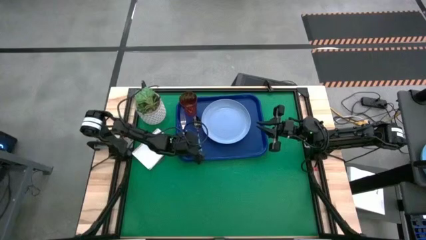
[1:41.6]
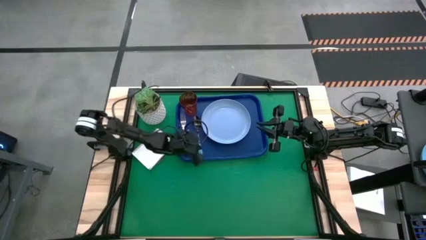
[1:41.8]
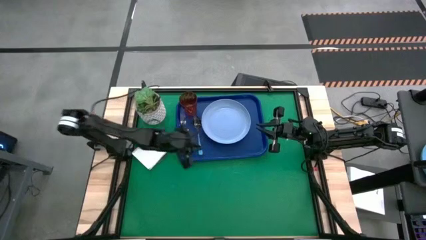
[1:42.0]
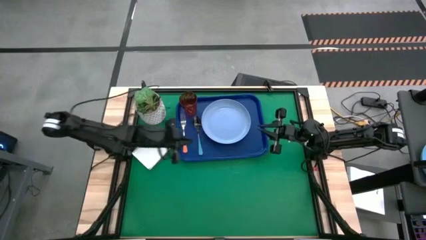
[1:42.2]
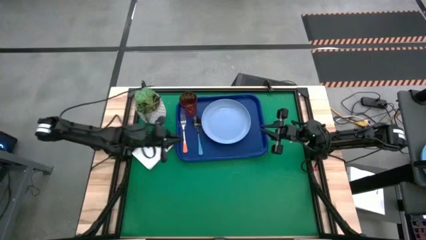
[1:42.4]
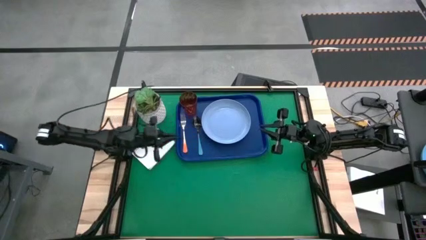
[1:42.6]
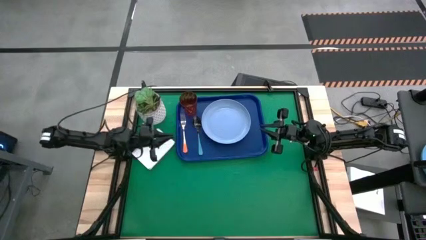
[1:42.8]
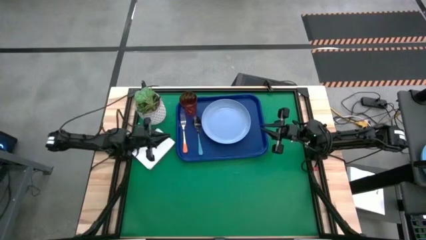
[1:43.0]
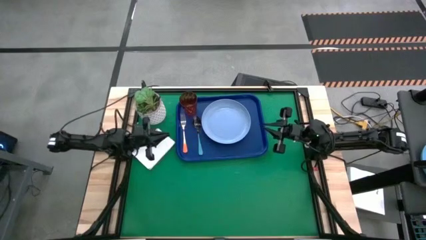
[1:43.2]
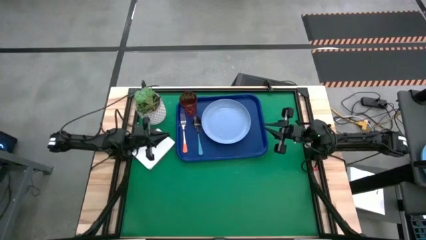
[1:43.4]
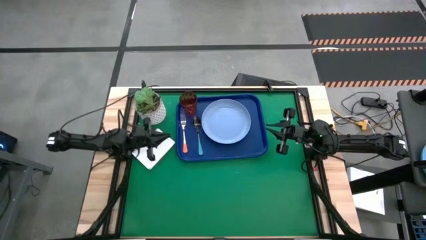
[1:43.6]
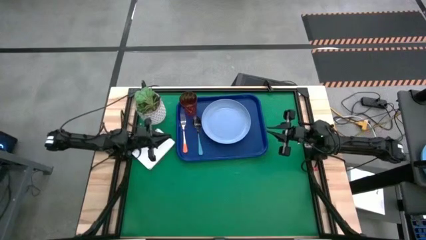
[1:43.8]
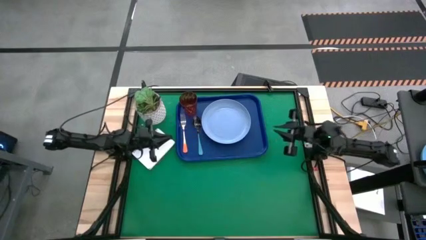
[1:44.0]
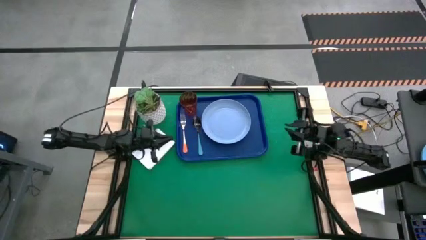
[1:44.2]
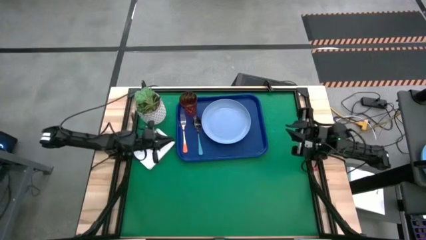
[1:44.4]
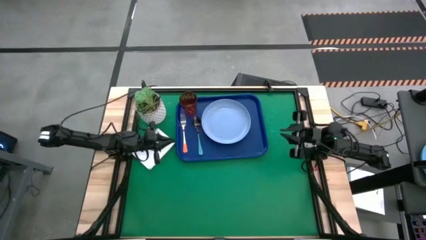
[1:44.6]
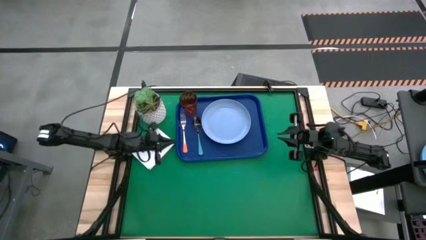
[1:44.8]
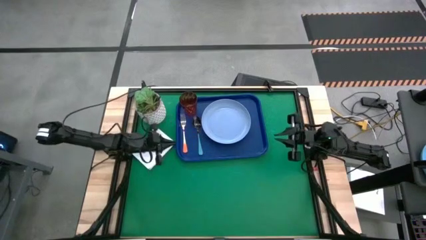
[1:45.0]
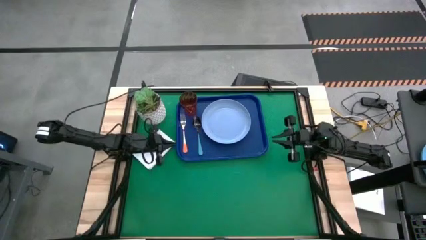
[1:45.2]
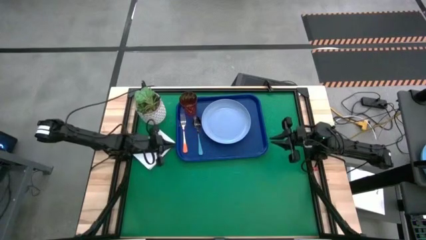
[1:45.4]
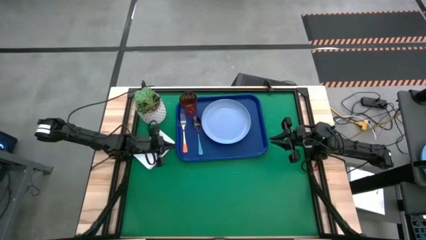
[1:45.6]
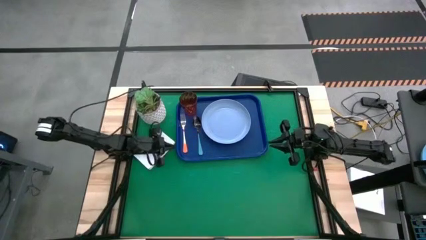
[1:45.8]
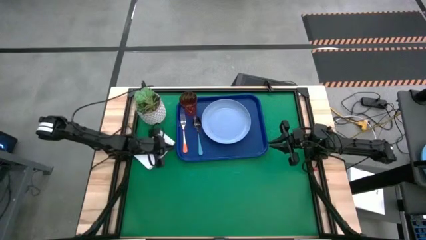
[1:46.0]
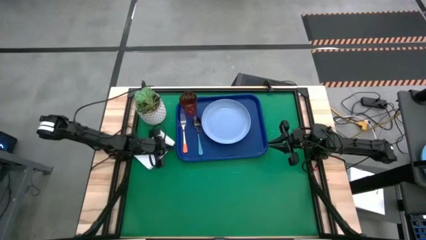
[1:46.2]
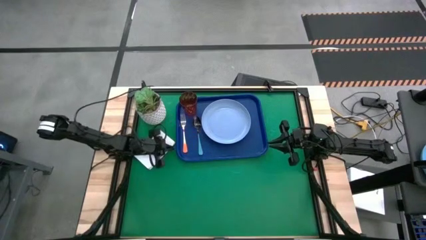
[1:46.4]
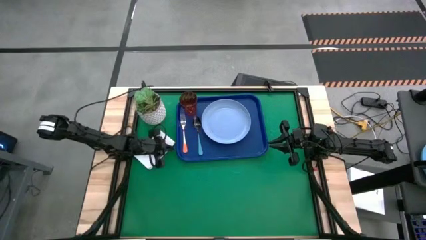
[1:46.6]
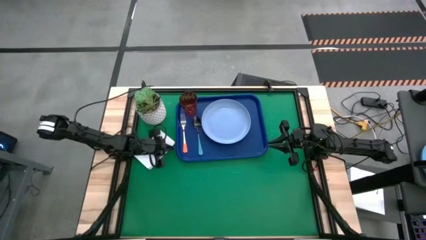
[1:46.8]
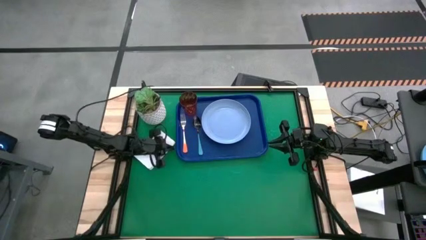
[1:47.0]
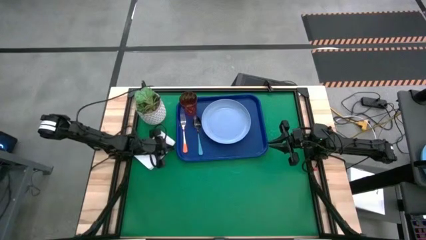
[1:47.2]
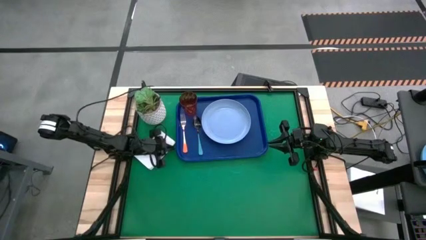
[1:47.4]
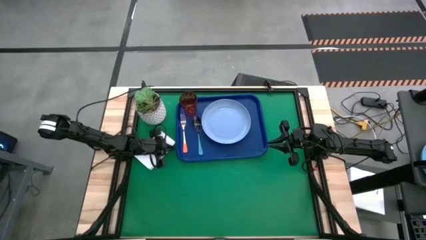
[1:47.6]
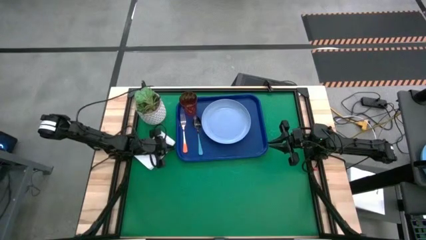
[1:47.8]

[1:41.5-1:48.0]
Task: Pick and place plate/cup/fork/spoon on tray
Return to Home Position

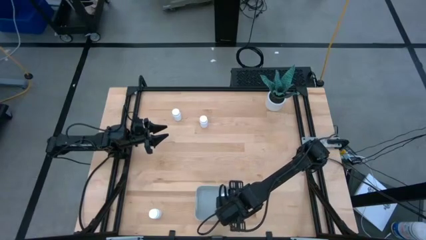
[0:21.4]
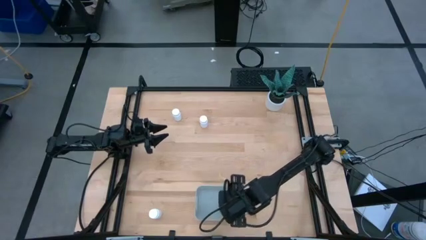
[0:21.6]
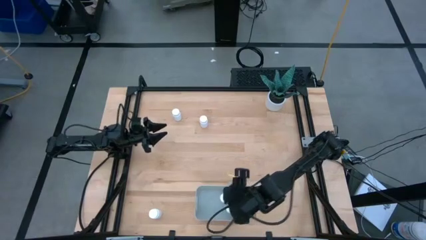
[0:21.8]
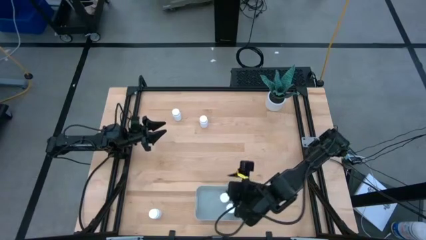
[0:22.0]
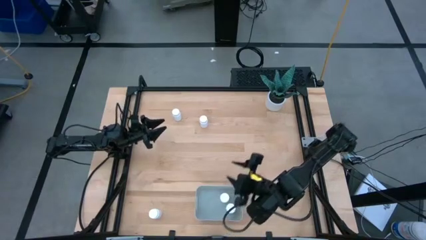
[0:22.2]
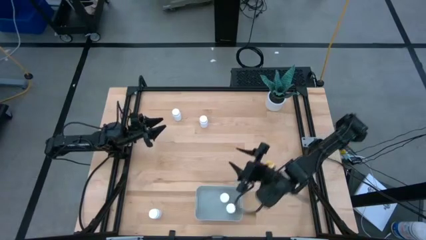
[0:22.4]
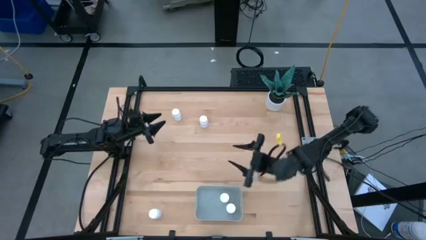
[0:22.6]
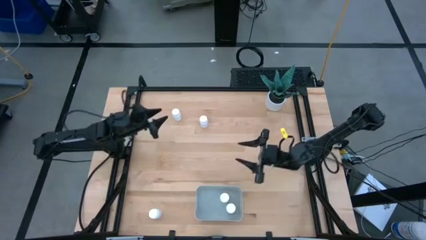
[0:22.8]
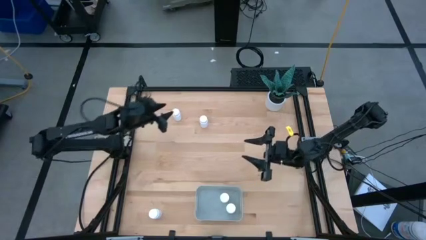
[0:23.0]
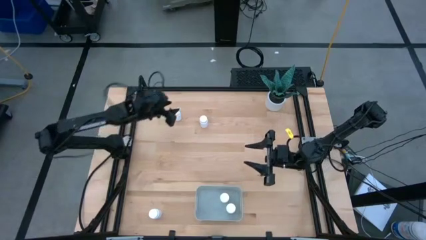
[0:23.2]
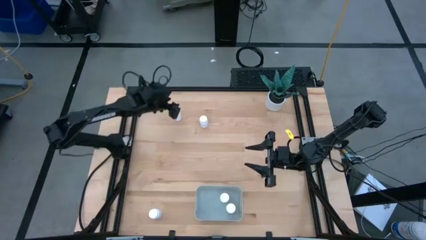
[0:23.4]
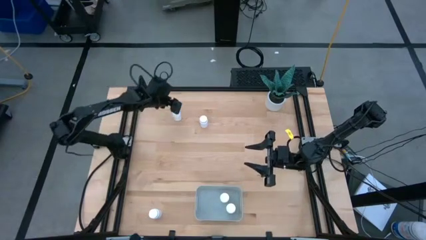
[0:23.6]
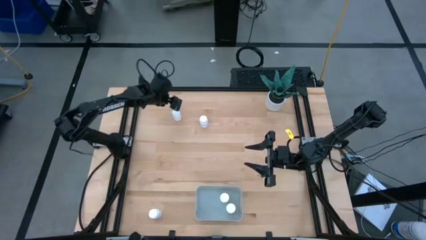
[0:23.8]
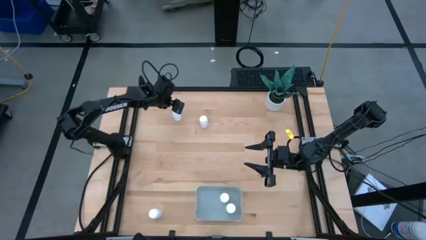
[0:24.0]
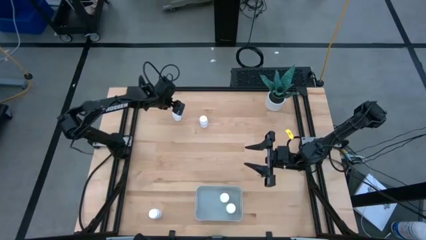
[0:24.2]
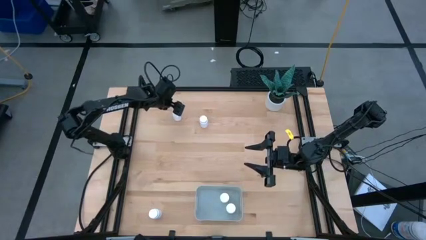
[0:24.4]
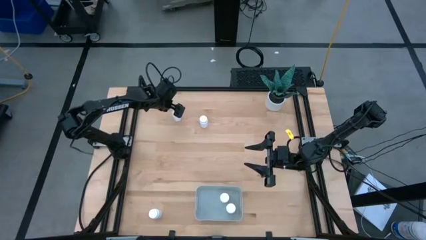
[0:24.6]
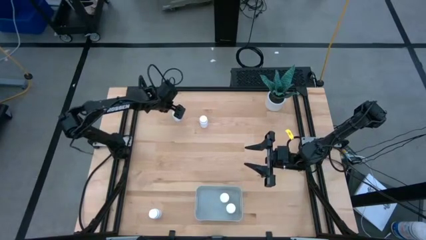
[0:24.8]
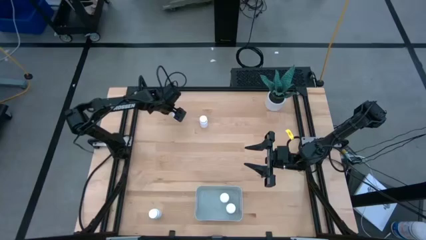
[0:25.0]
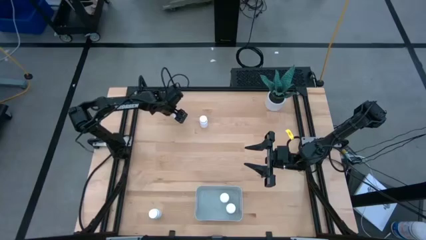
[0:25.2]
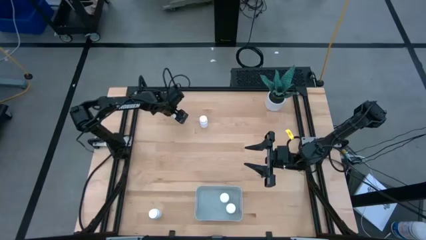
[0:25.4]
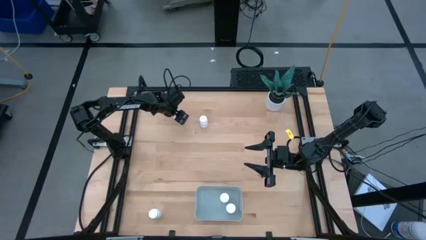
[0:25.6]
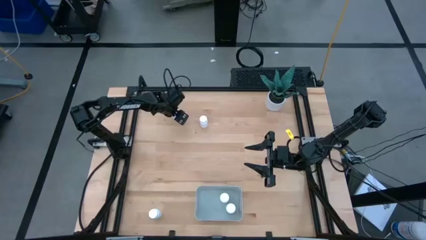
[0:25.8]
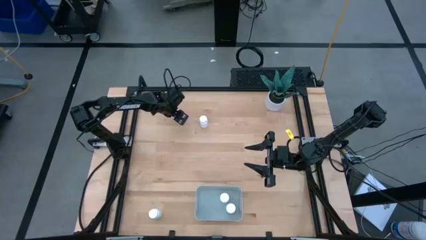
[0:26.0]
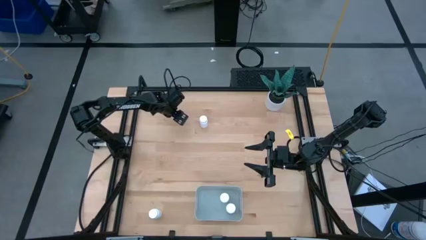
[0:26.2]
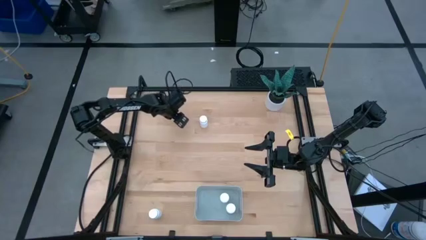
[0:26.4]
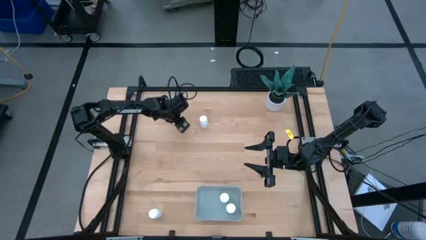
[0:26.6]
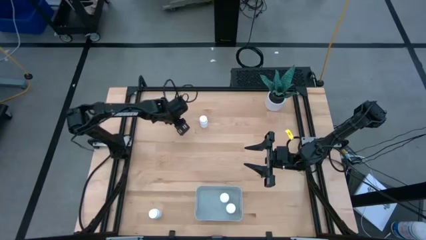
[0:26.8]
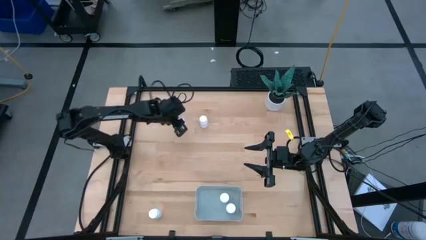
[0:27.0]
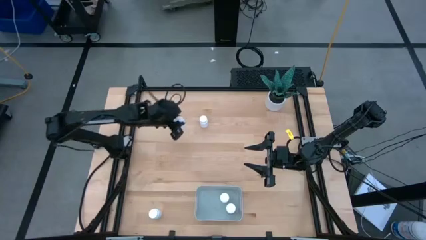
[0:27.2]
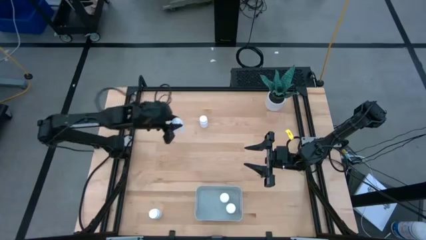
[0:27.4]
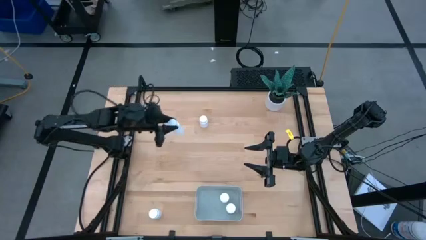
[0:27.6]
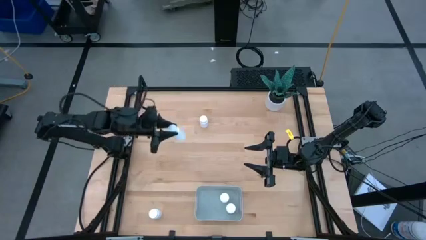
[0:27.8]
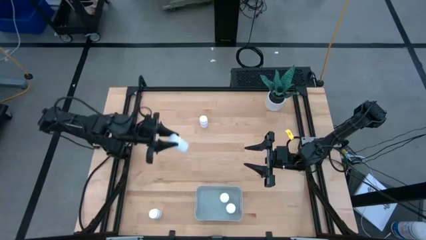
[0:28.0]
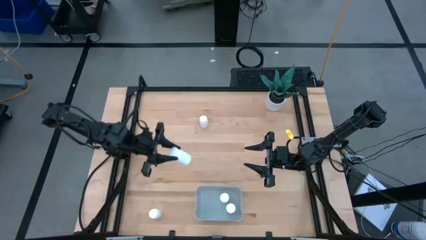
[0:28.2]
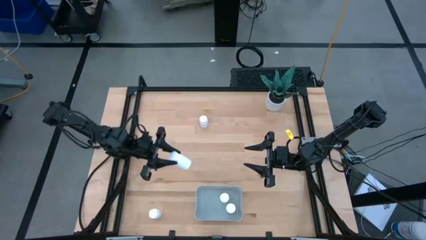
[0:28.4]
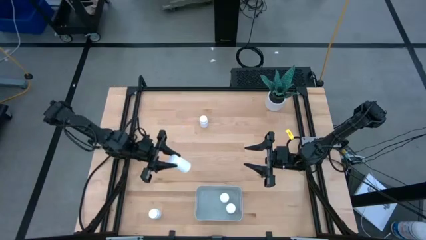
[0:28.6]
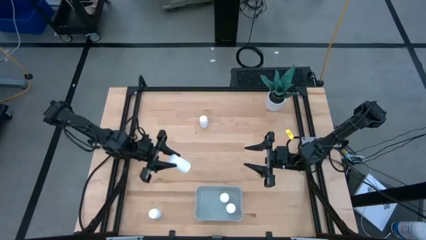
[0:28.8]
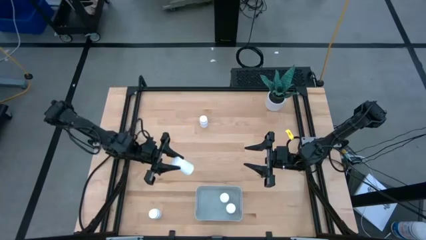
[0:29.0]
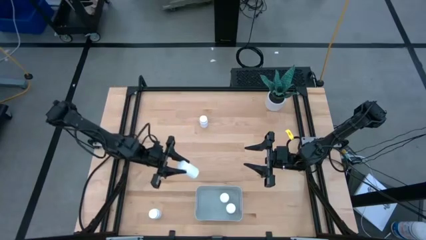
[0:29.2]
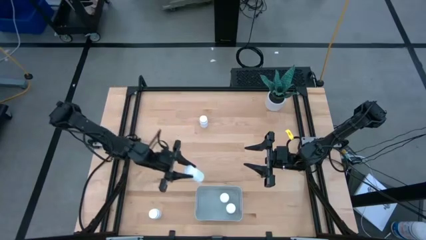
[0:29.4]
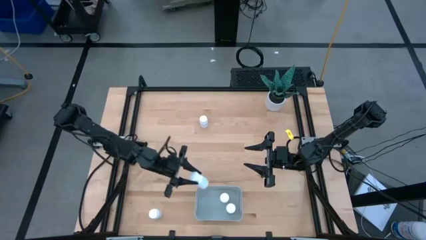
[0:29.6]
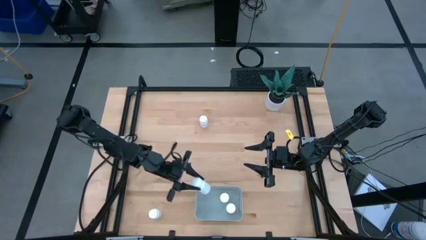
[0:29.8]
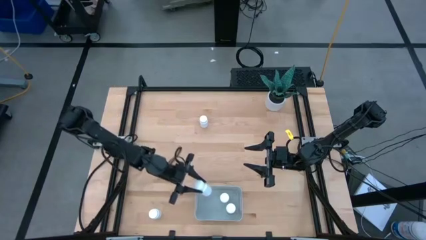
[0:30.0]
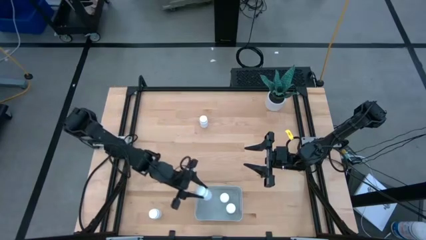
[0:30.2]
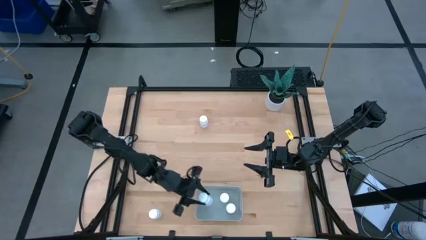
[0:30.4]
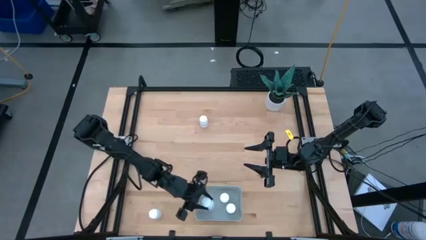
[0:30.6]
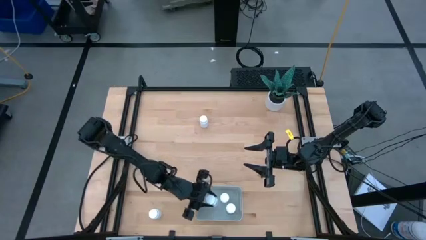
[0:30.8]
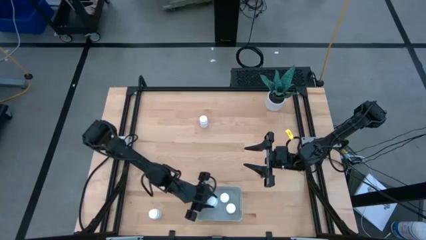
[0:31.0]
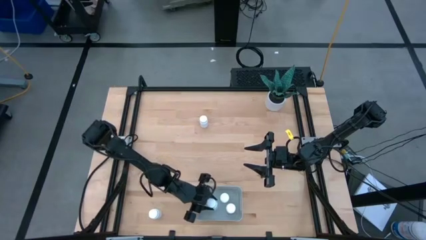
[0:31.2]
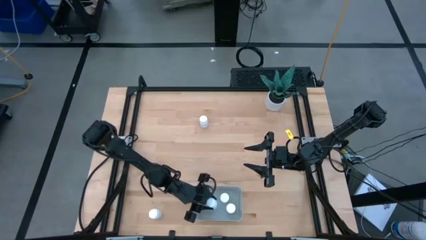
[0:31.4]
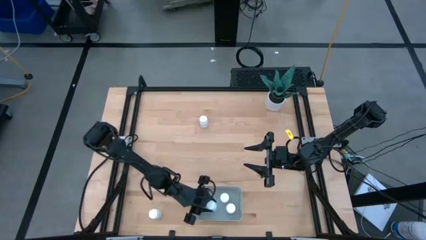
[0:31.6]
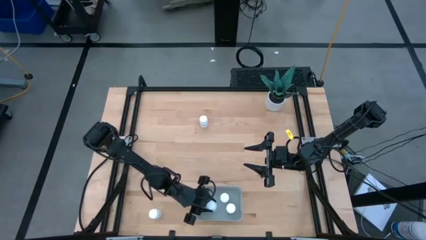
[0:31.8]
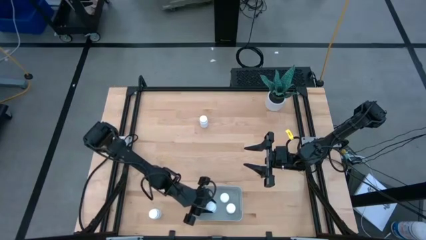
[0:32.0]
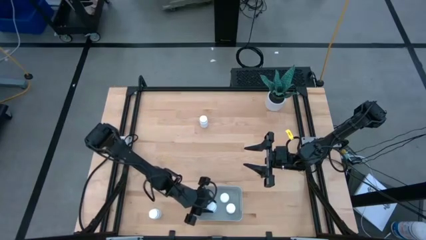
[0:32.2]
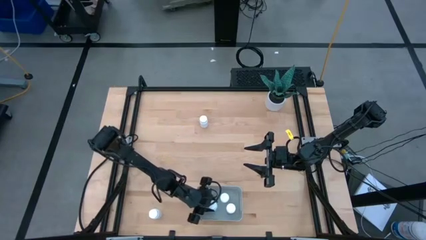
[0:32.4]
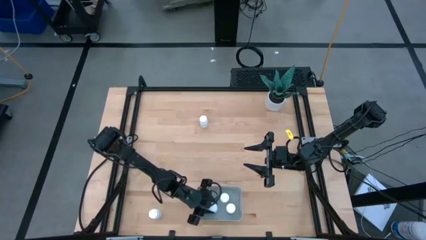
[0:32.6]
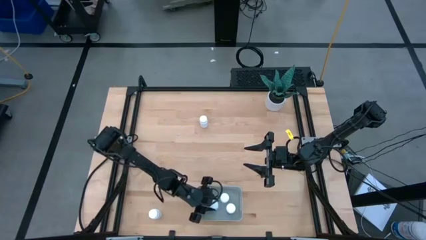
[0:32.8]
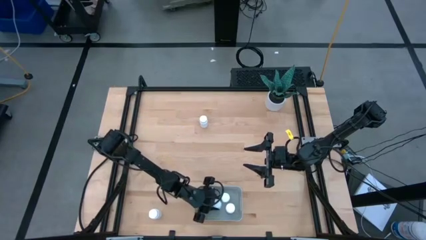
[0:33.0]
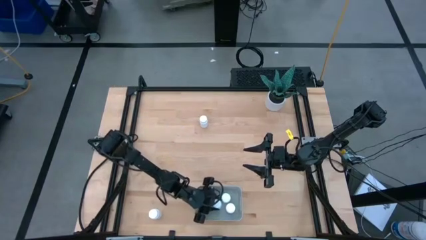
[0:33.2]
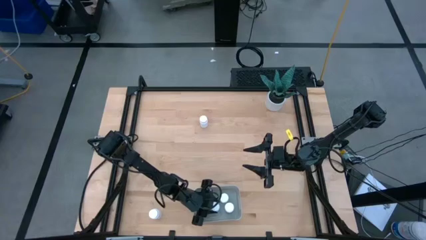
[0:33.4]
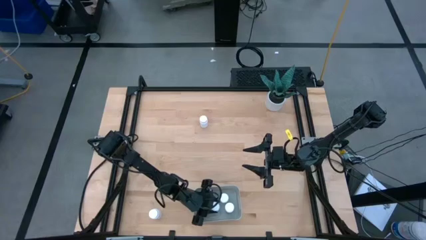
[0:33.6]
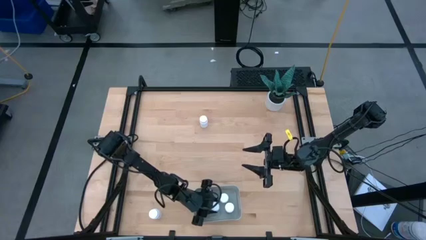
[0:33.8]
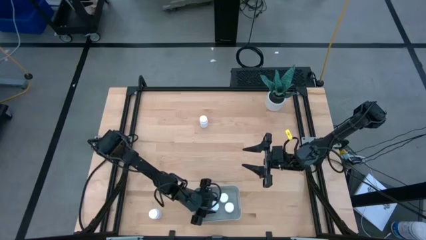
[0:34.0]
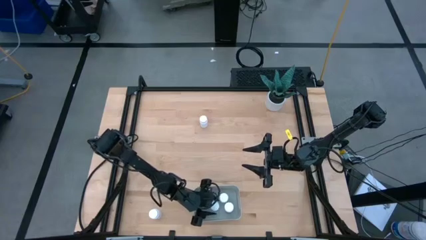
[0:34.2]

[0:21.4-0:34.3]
Task: Pick and place pill bottles into a basket
Put the white pill bottle into the gray bin
